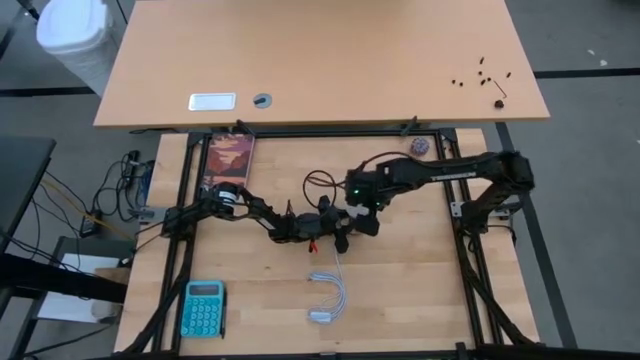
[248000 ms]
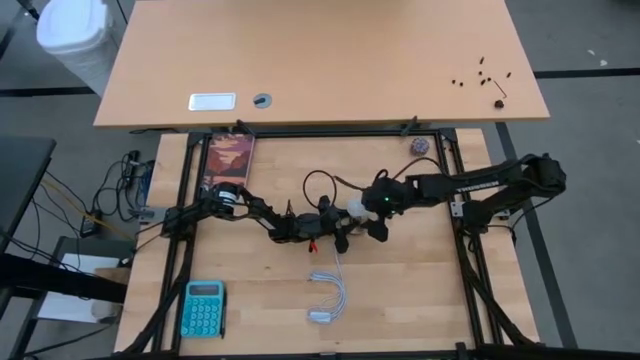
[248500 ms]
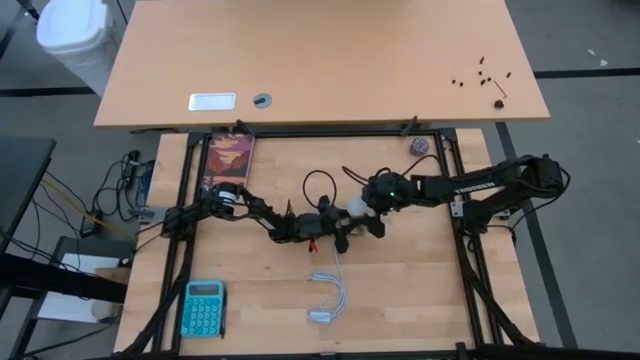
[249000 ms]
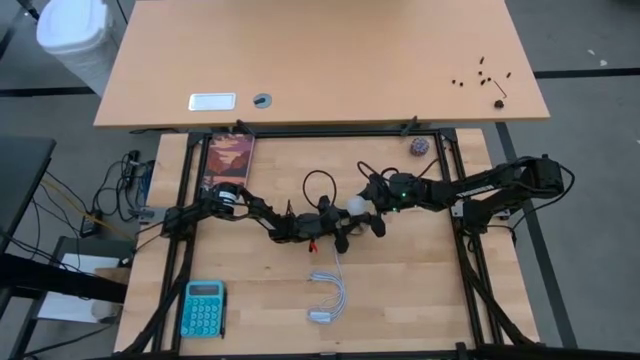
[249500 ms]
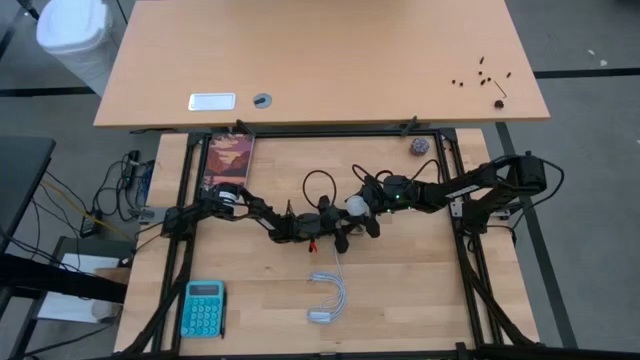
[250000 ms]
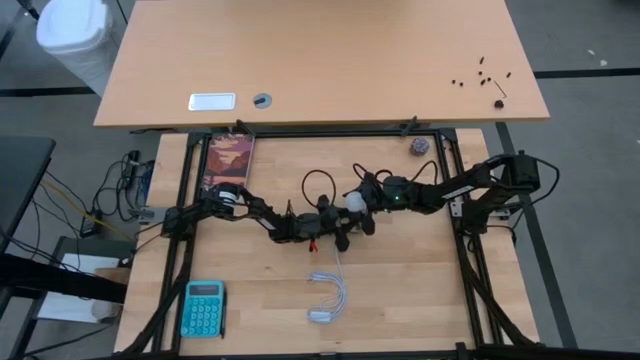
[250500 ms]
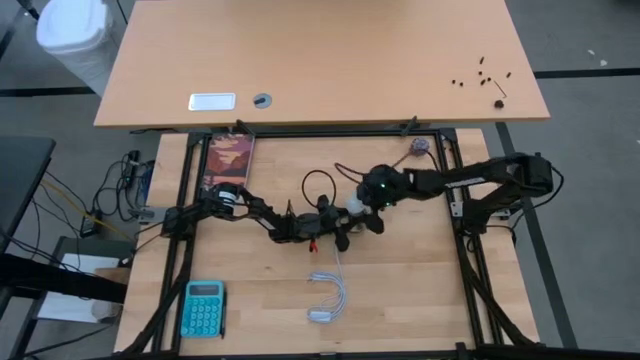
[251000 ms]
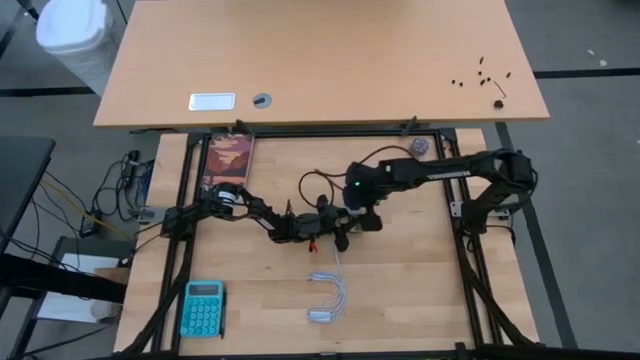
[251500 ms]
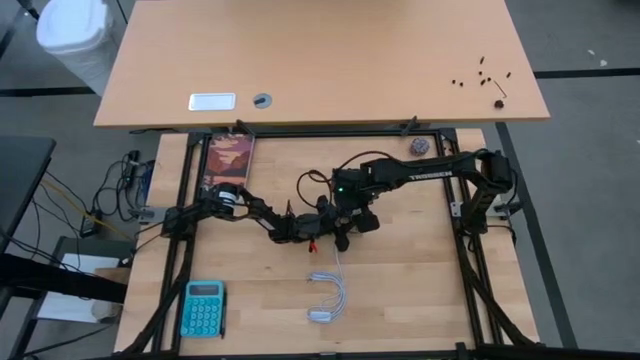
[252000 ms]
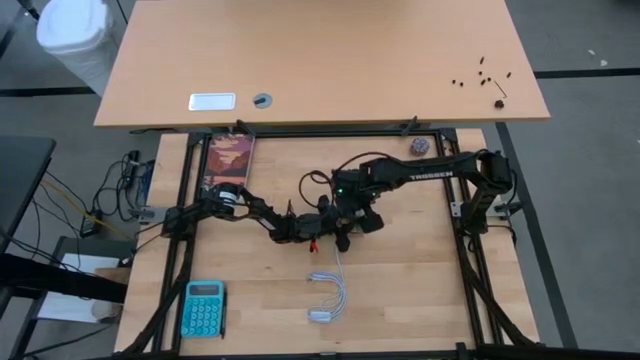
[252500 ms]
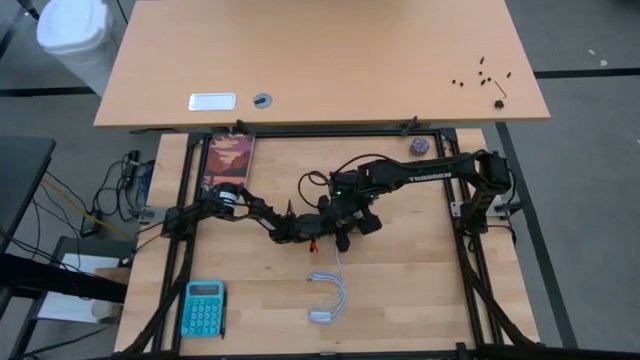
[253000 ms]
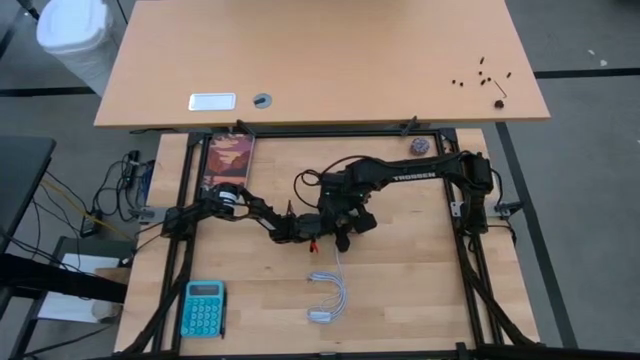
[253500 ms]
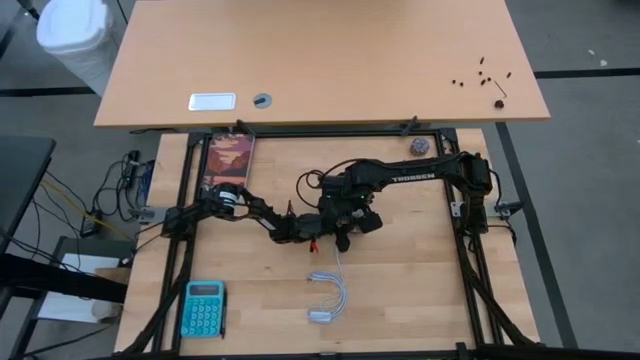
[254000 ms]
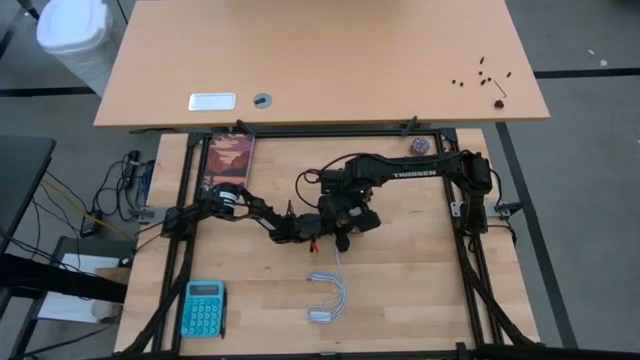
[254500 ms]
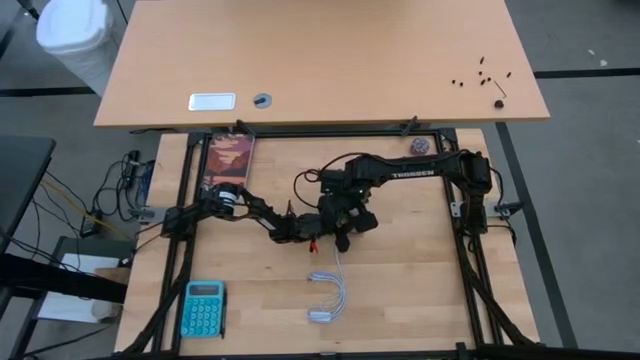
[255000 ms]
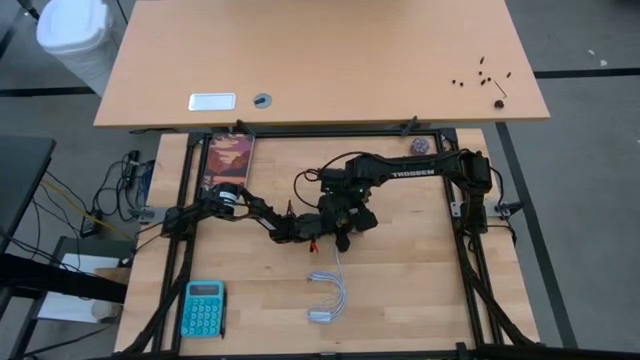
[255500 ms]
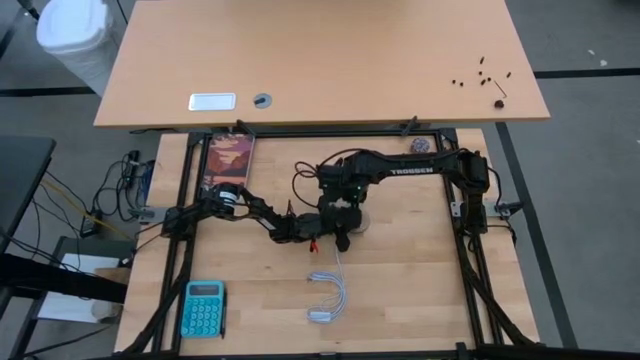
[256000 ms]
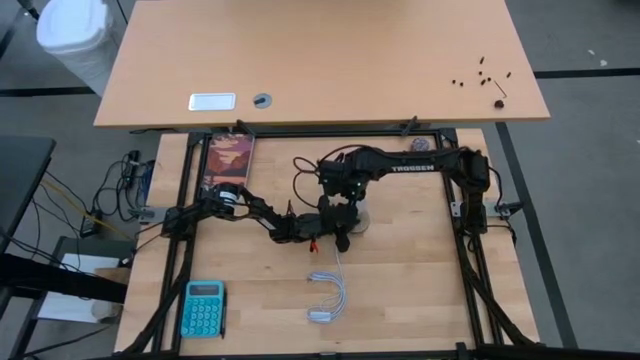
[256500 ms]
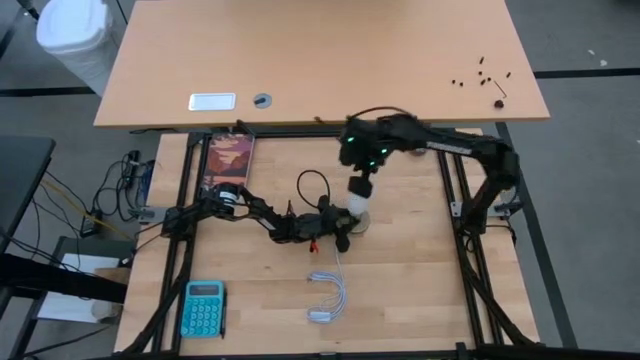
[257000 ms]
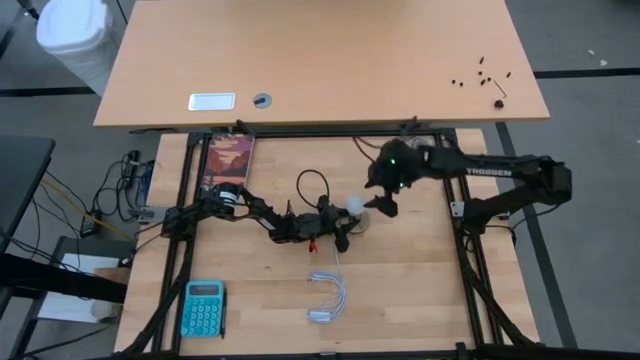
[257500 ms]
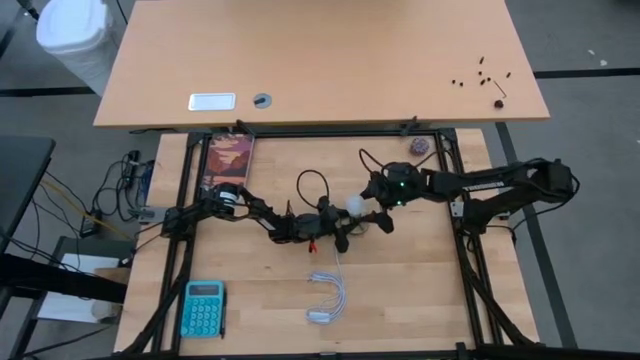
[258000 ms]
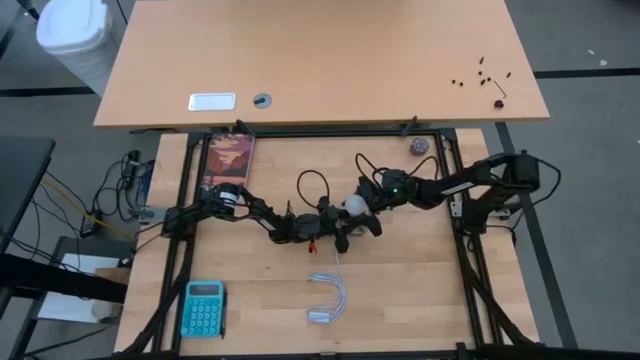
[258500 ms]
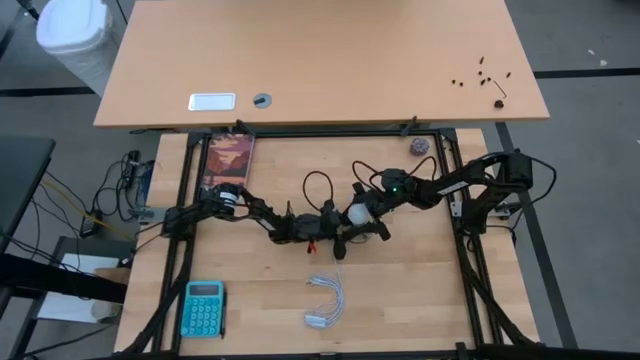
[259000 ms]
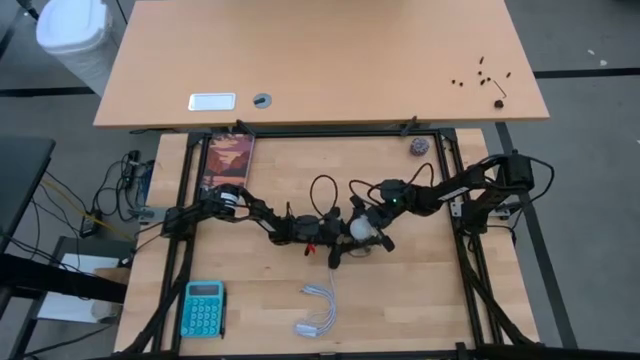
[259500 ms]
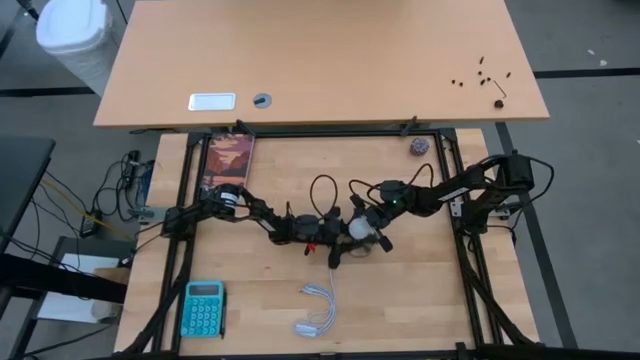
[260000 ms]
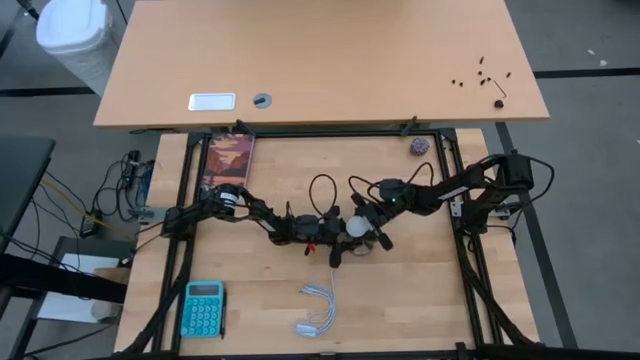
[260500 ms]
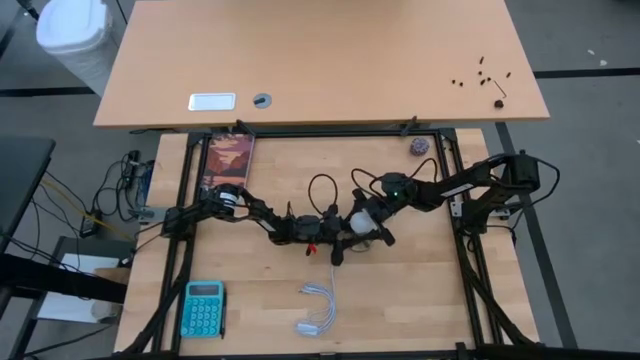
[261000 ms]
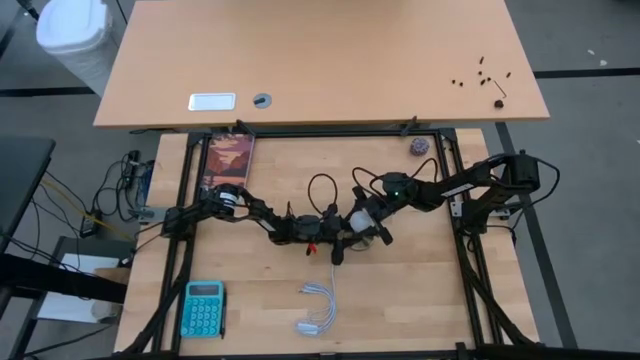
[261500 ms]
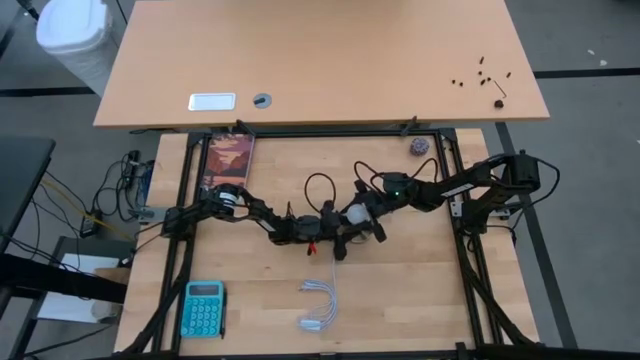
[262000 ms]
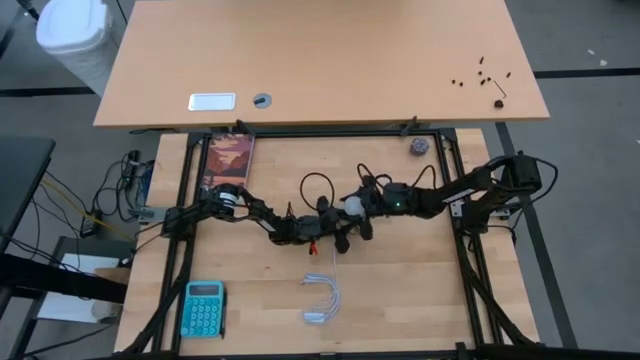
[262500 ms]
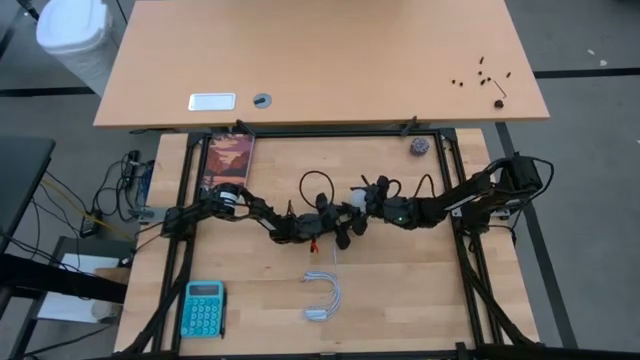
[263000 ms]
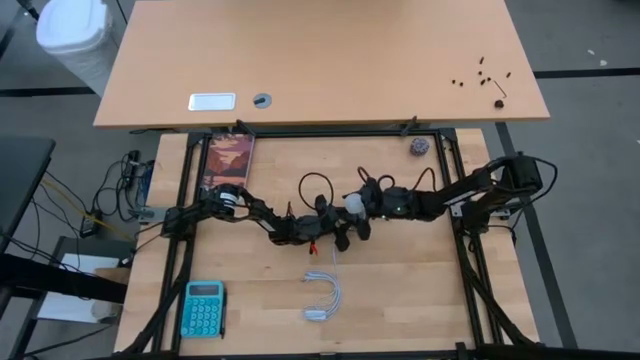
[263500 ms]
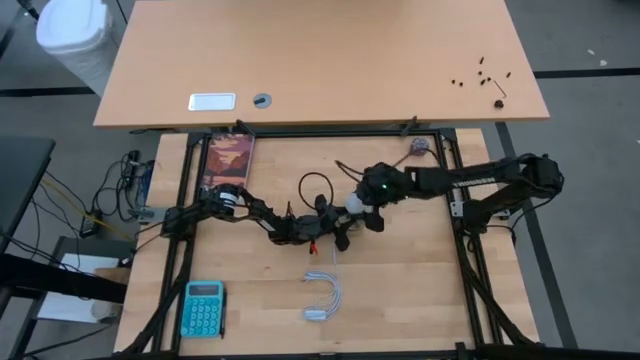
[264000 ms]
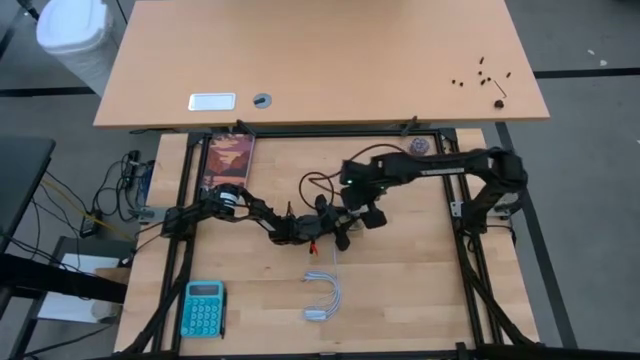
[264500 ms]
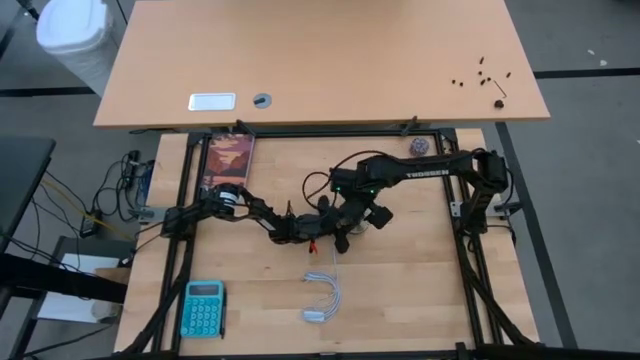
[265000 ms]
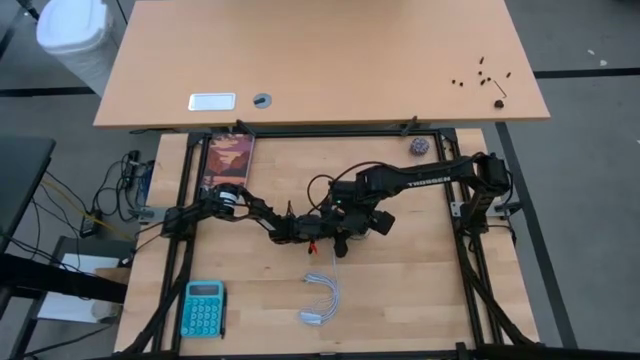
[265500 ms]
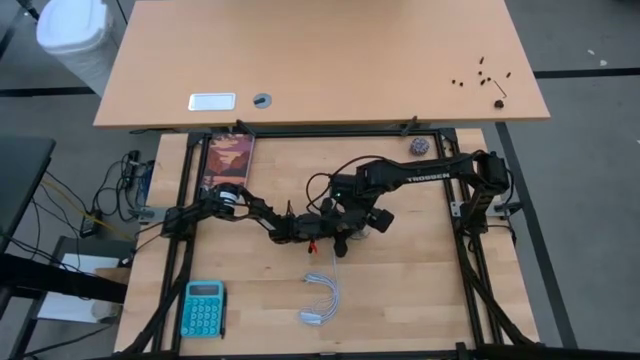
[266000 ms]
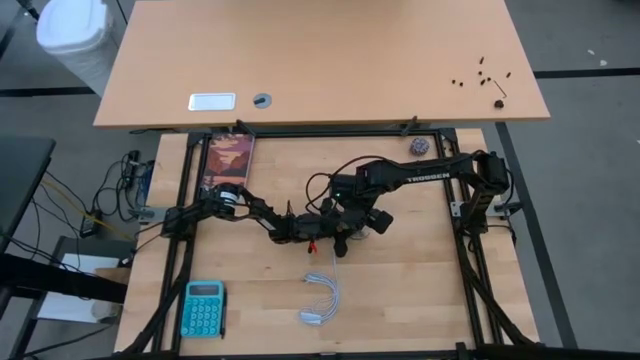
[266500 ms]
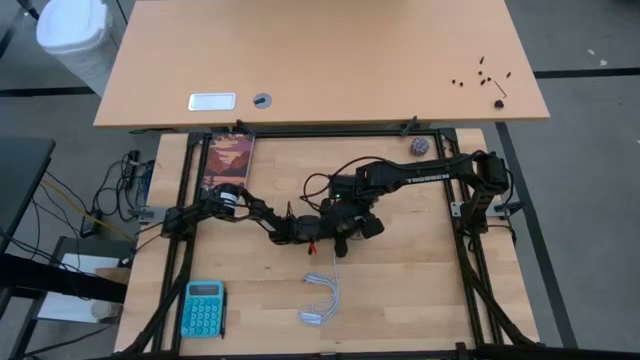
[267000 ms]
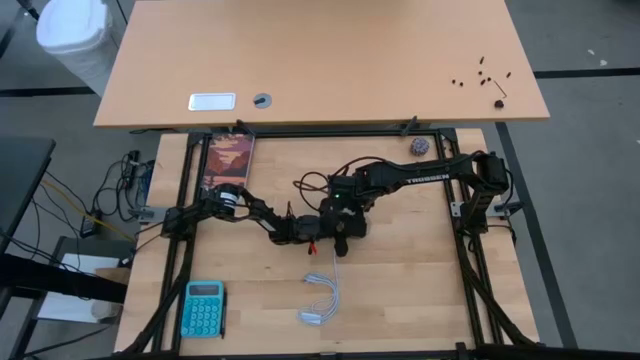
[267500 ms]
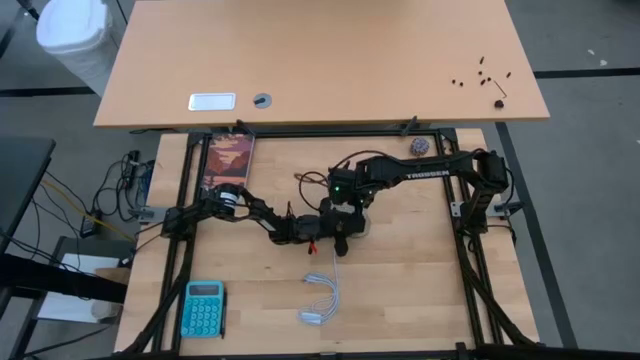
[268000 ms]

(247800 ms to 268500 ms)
Task: Screw lightbulb
Insert the lightbulb into the desk lamp
